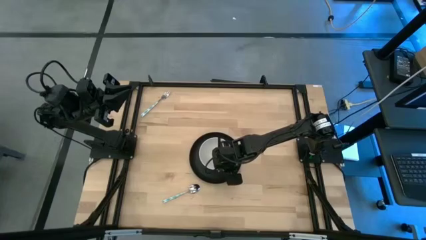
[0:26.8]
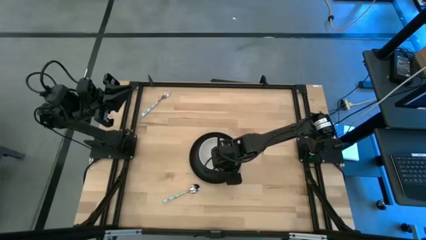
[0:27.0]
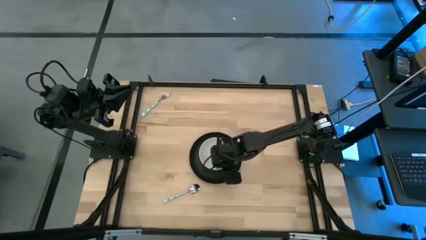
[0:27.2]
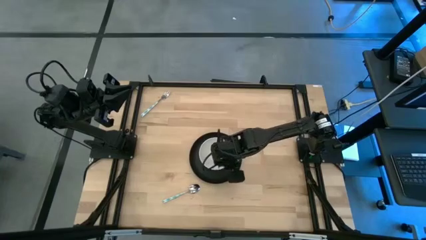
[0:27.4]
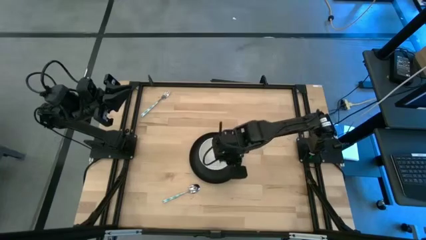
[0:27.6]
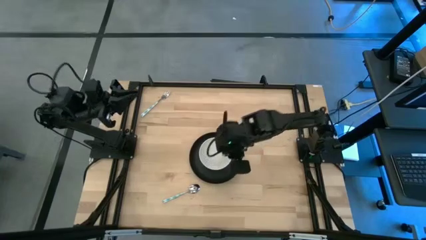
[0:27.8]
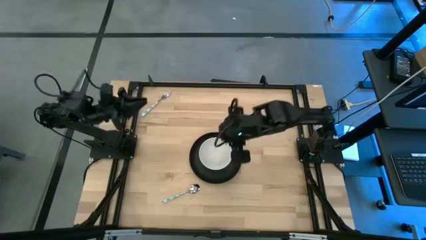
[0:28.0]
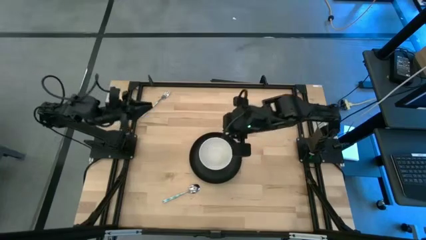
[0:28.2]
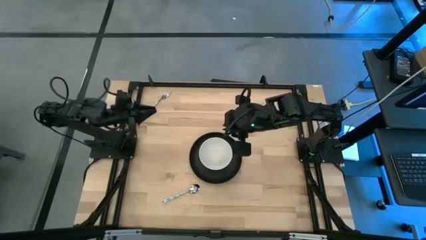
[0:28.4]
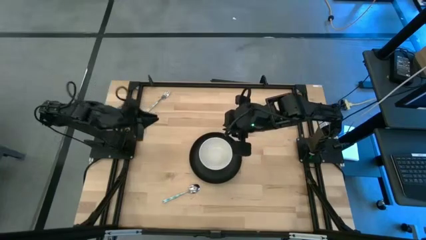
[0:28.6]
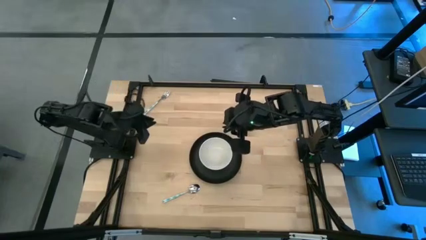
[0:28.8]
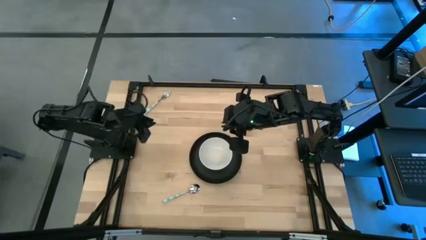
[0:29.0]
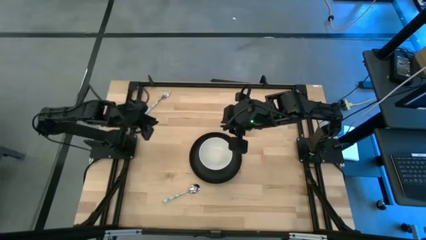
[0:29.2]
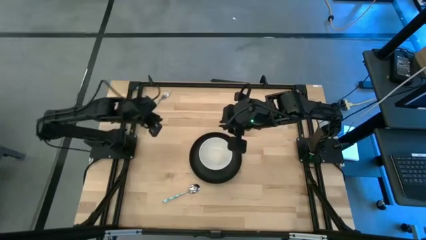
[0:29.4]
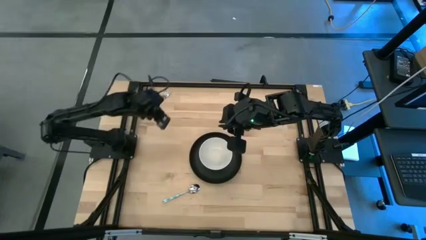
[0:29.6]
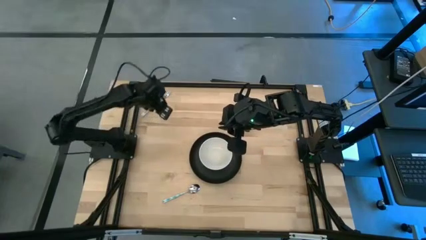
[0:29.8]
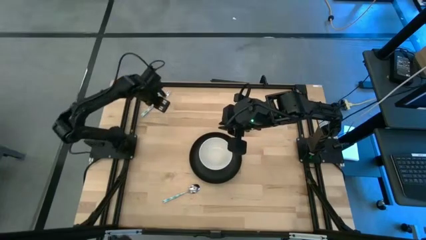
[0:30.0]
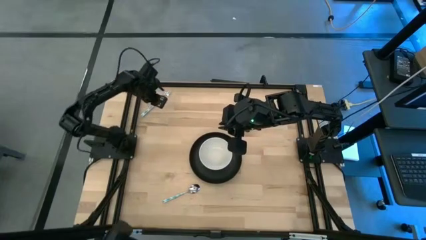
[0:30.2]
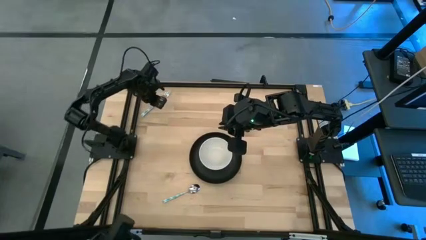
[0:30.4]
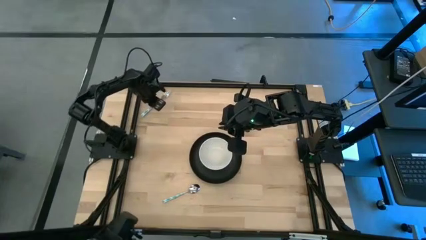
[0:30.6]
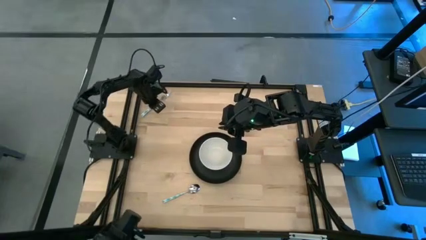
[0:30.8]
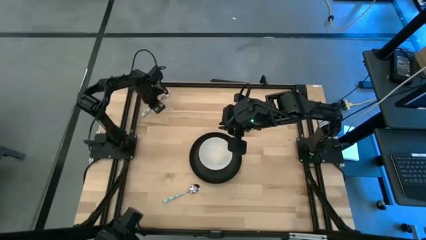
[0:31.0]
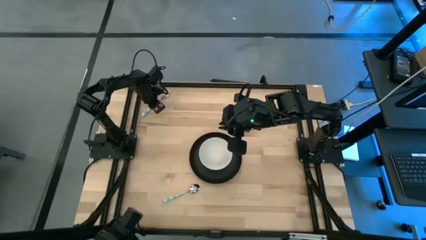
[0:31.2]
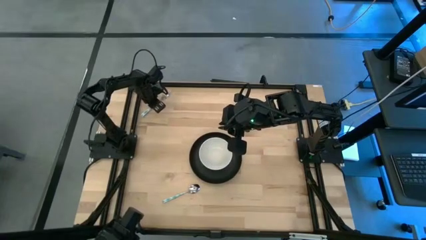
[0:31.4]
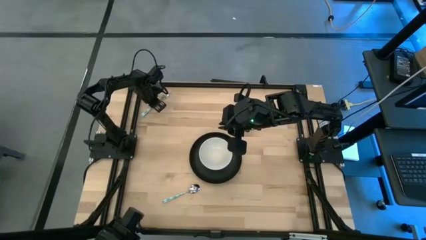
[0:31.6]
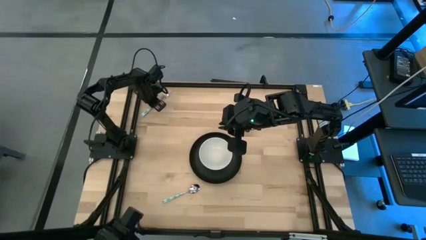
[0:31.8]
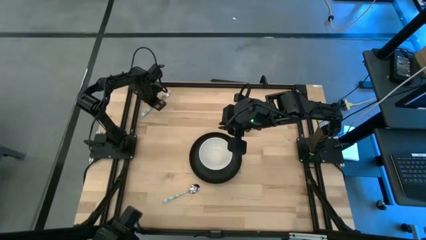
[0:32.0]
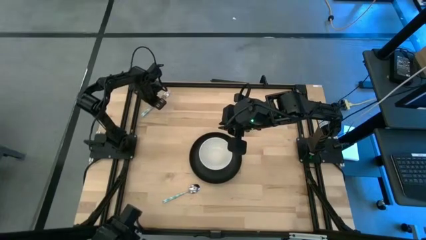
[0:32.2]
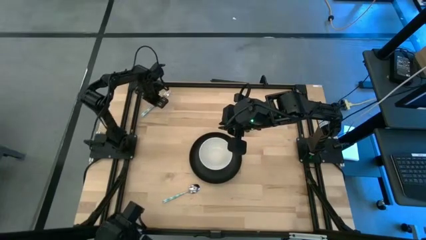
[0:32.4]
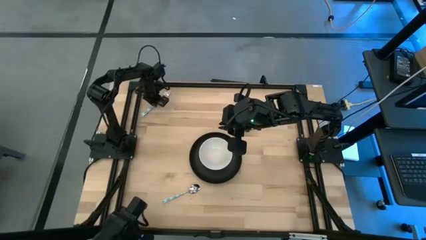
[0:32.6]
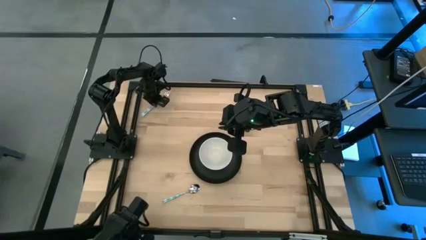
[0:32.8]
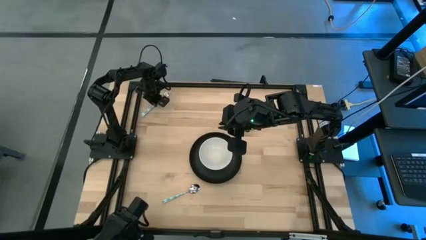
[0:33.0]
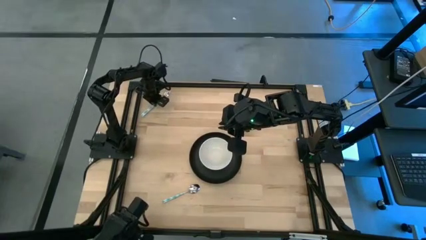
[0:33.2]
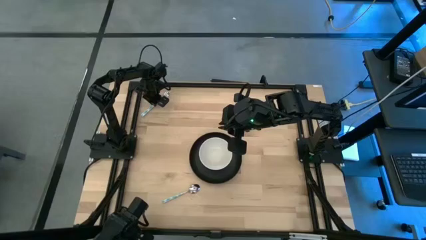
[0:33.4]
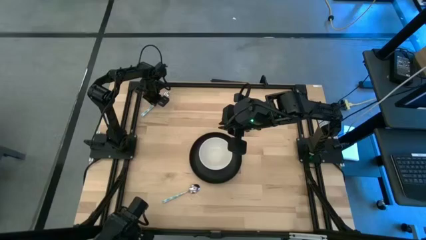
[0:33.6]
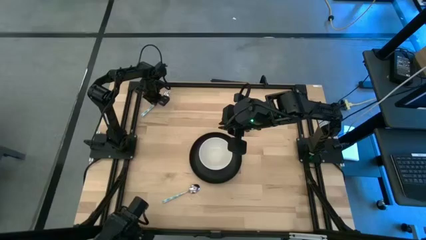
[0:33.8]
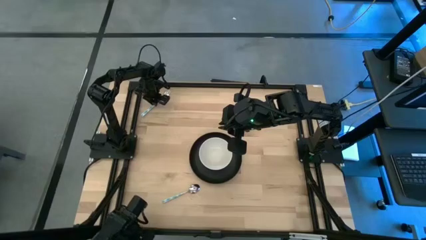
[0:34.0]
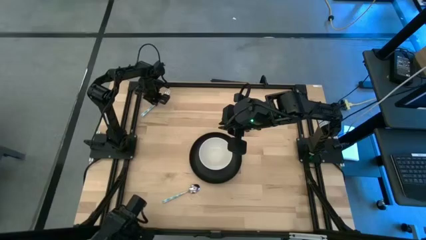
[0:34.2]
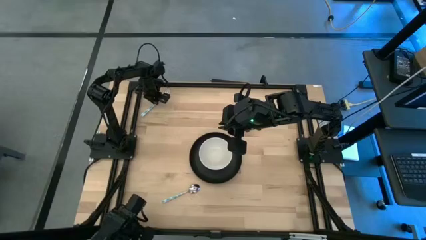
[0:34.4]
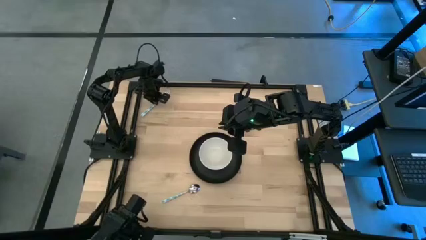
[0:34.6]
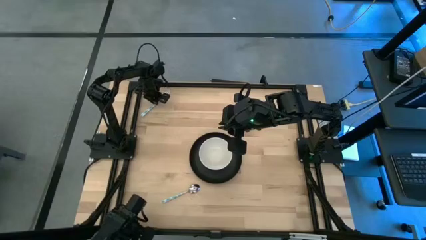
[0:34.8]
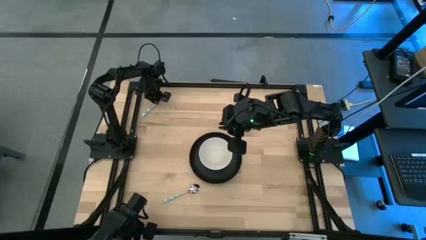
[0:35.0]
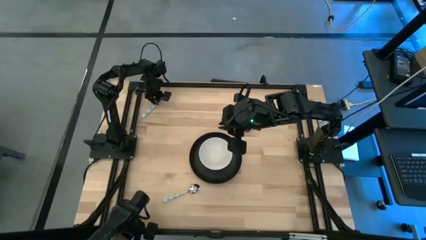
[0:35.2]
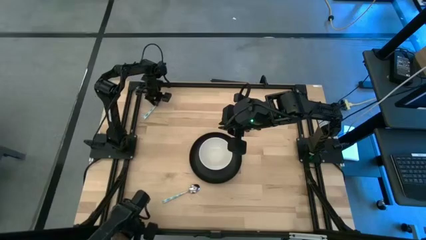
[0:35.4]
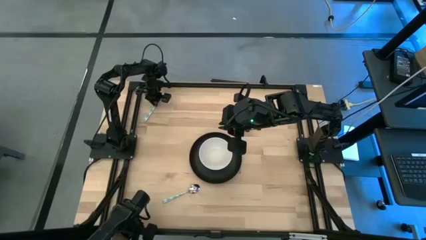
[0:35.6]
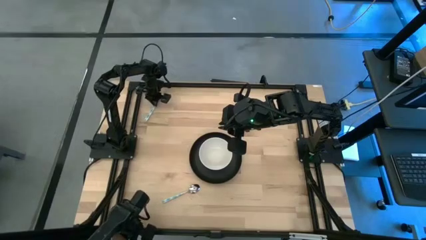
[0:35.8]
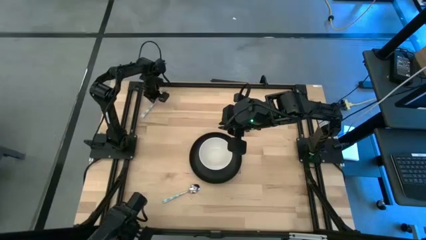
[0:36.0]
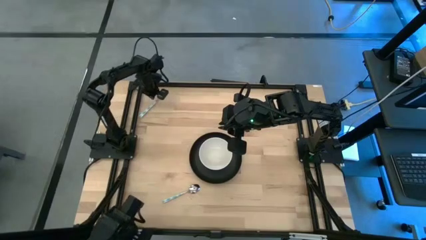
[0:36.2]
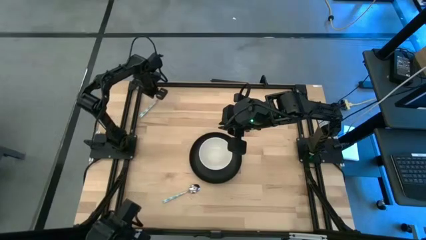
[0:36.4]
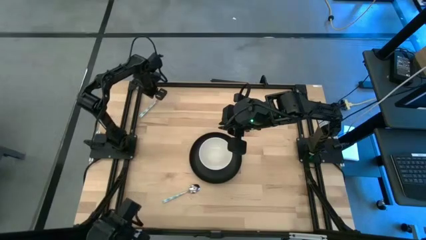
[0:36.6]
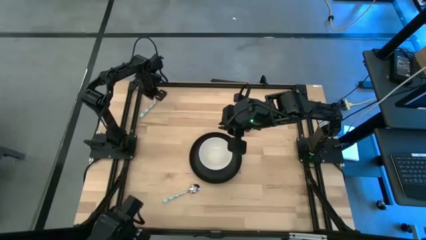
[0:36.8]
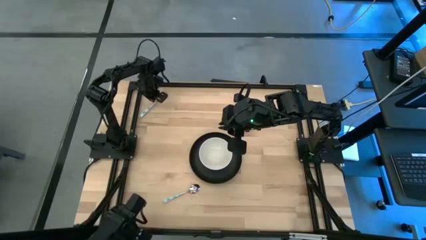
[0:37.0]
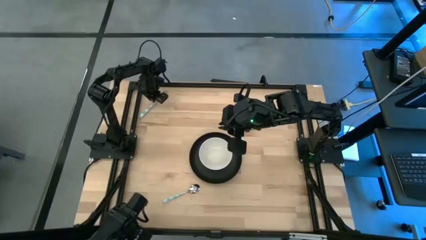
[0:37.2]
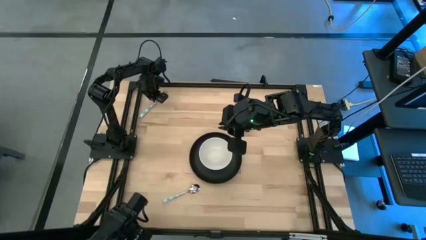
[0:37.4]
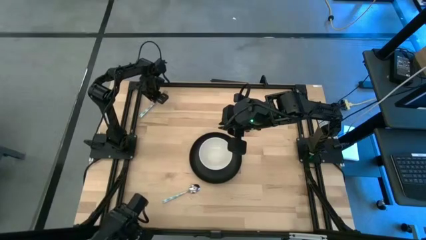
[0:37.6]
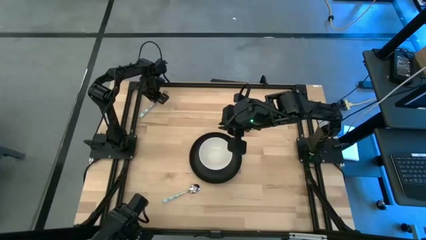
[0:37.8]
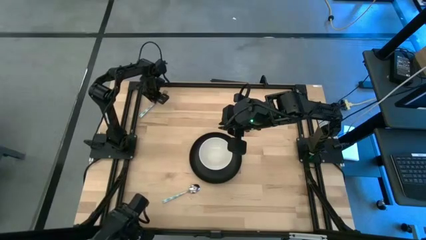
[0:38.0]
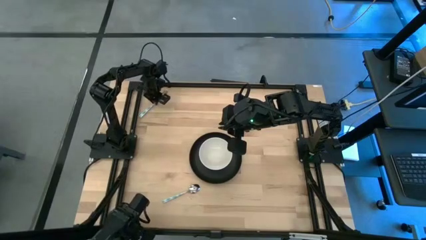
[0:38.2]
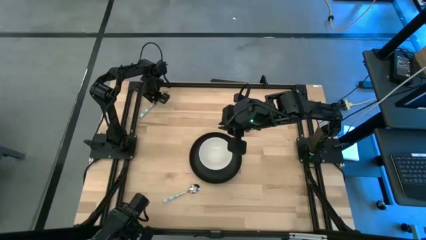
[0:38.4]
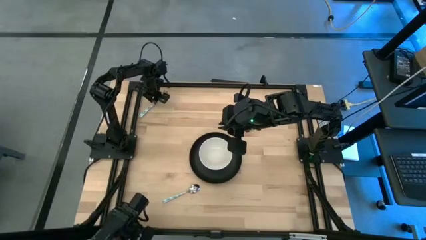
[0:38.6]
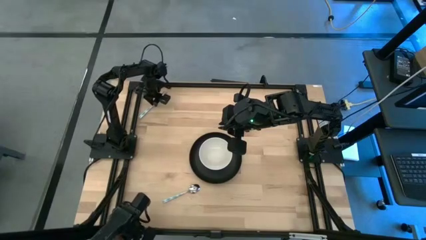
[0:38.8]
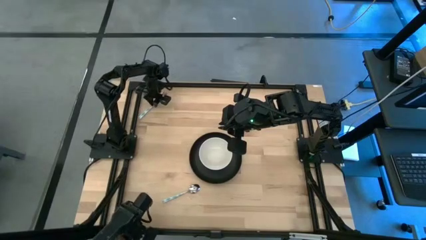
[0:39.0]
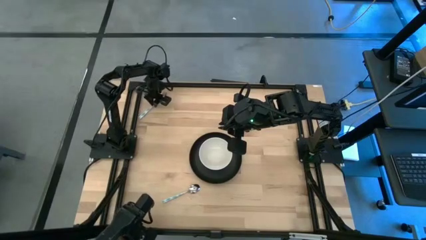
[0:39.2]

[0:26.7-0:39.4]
Task: Set table place
Move the blue fork to the left of the black plate

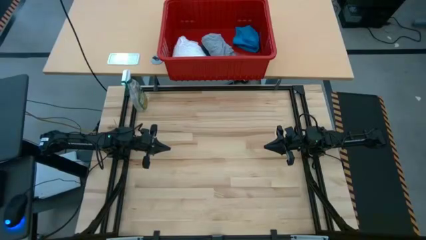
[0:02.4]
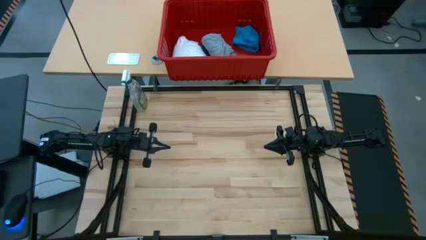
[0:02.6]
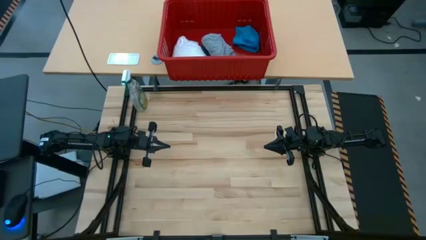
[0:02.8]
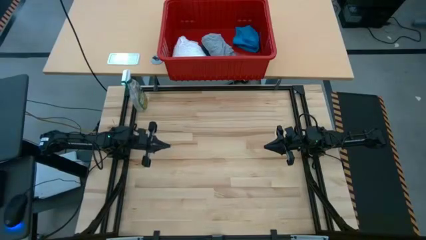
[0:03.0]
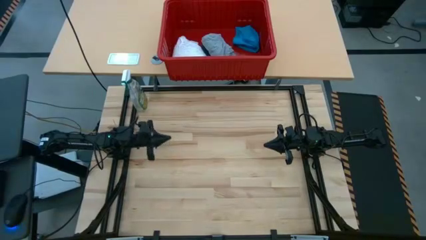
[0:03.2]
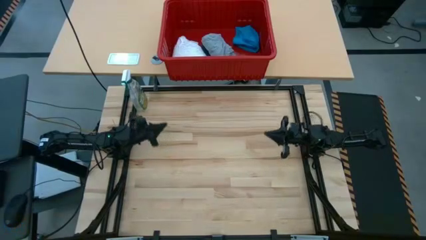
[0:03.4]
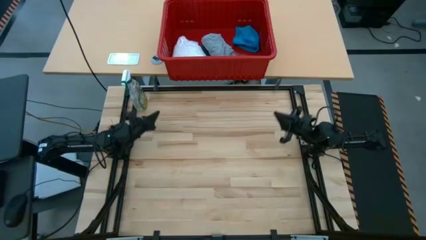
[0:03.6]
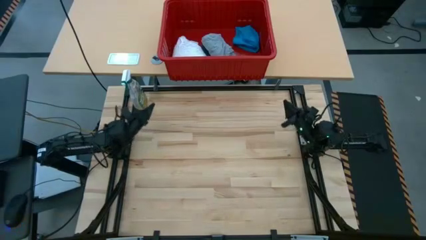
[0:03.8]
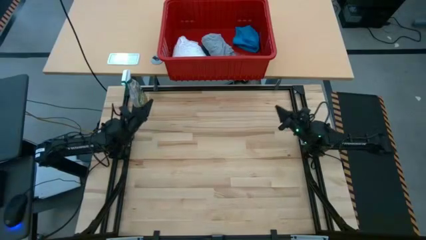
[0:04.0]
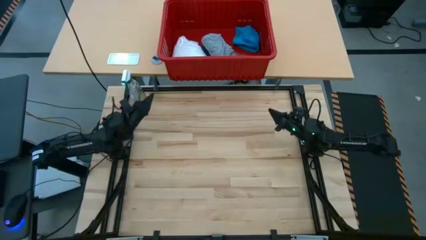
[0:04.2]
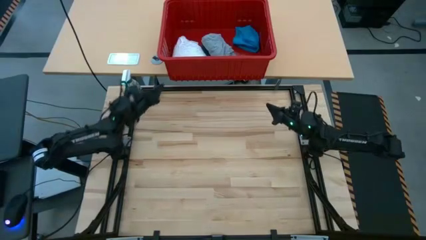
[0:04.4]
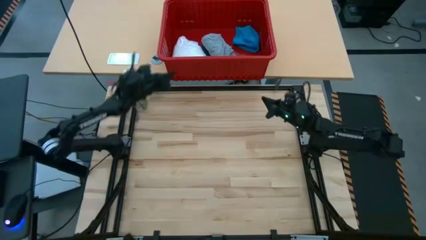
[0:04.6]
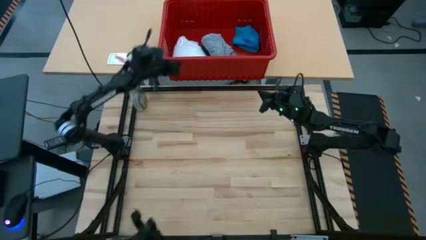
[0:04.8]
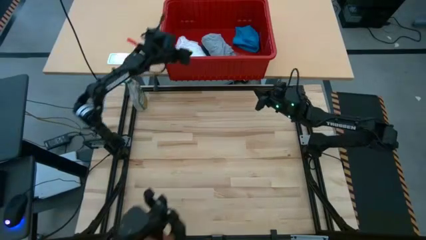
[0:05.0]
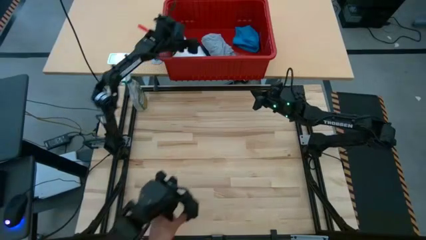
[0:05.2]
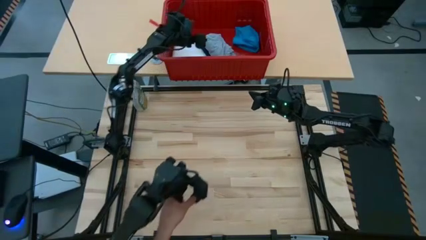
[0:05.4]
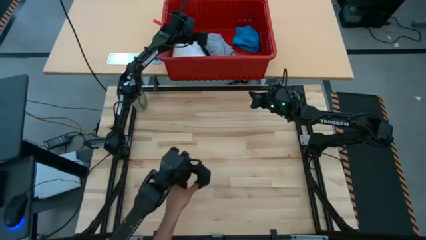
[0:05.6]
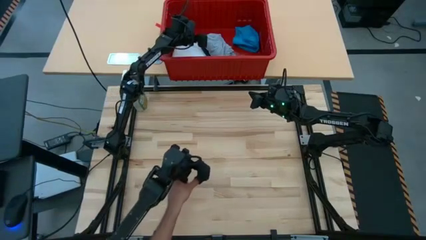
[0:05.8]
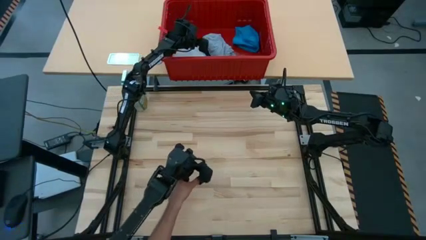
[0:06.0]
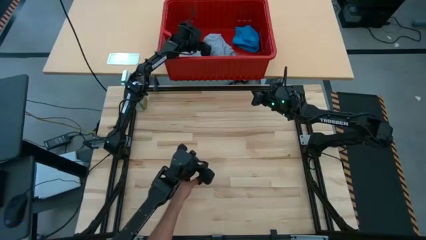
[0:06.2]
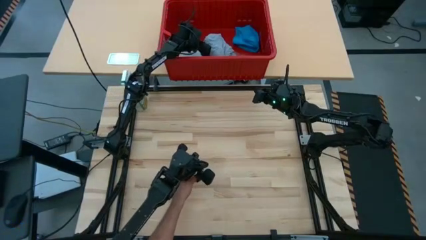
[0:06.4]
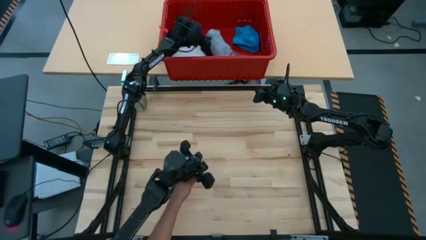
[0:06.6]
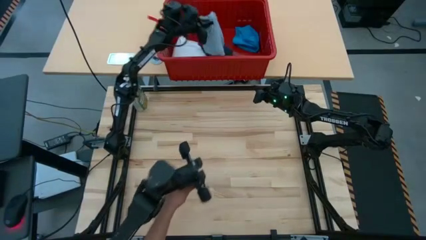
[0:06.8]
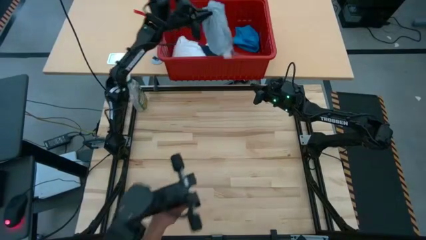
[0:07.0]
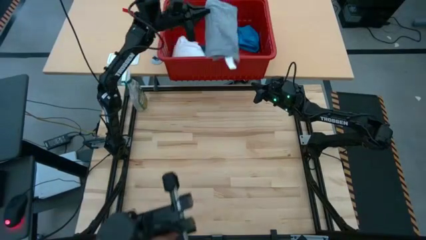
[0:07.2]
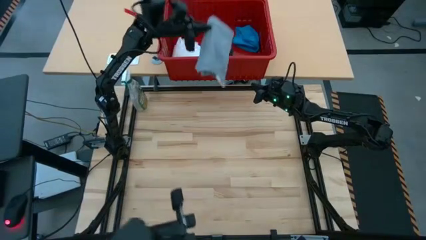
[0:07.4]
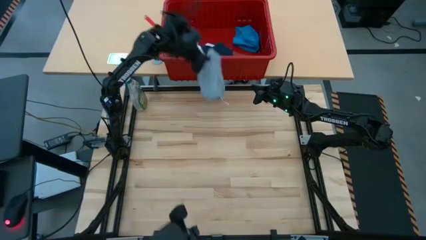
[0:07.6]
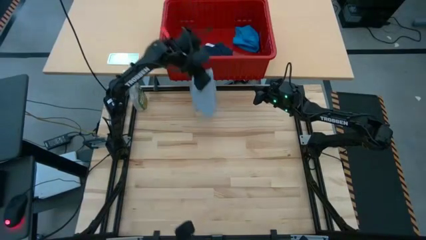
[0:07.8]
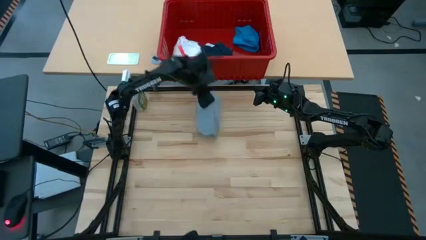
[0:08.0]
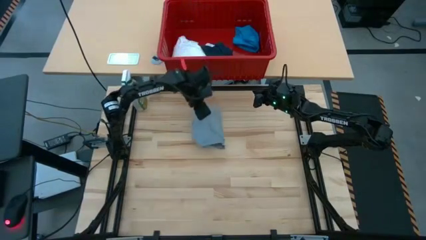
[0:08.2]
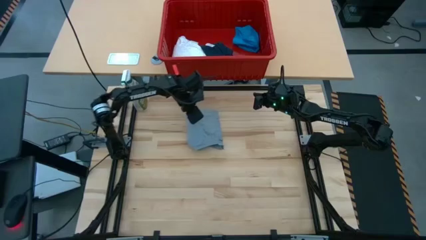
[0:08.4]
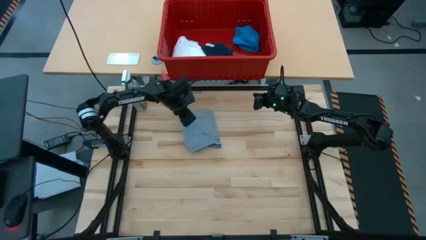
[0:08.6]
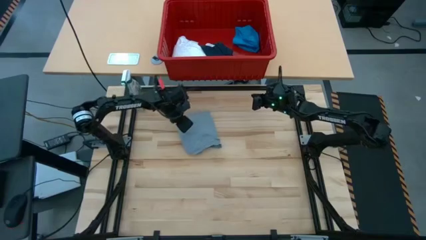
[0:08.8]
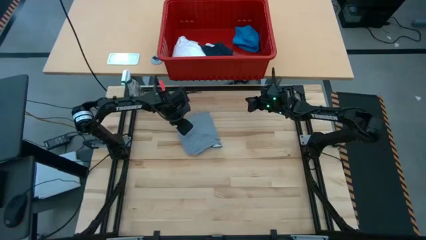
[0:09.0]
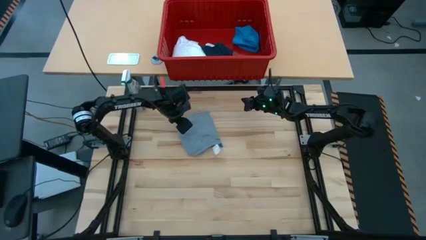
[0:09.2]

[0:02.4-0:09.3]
Task: Fold laundry
Remove the gray shirt from the red laundry bin
